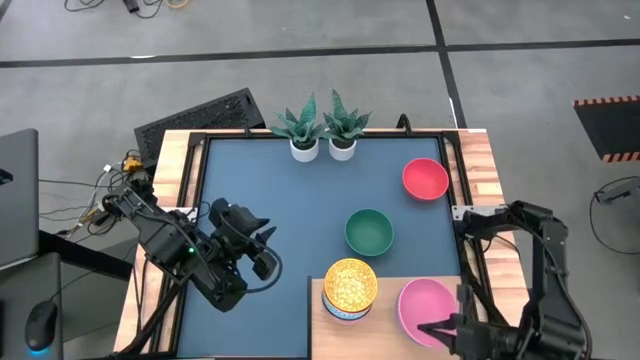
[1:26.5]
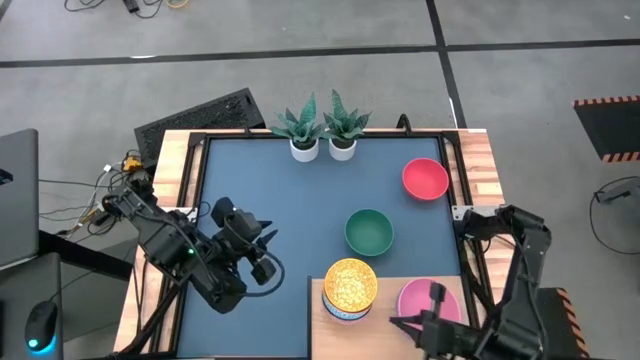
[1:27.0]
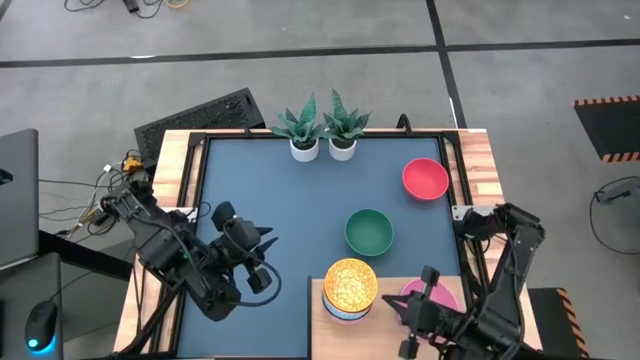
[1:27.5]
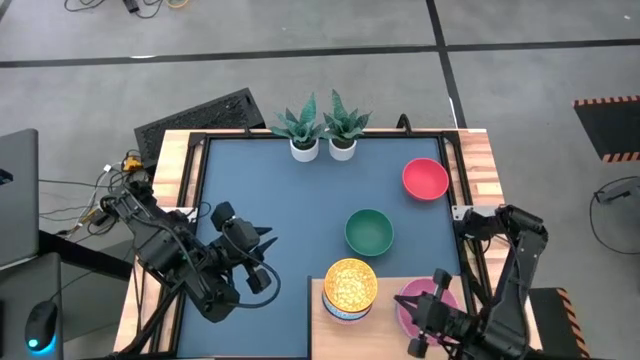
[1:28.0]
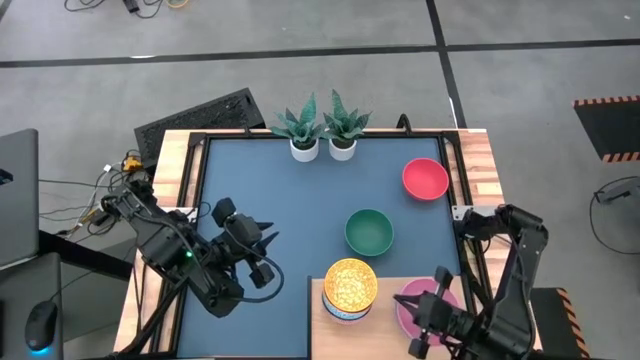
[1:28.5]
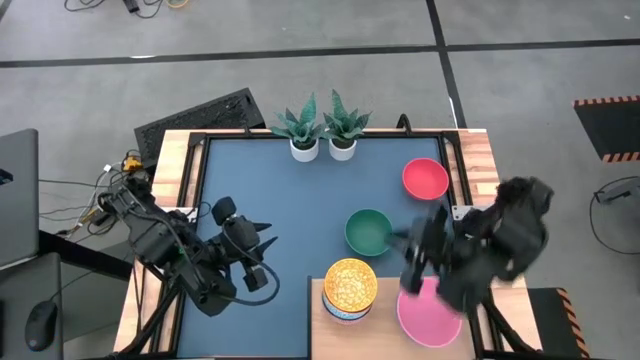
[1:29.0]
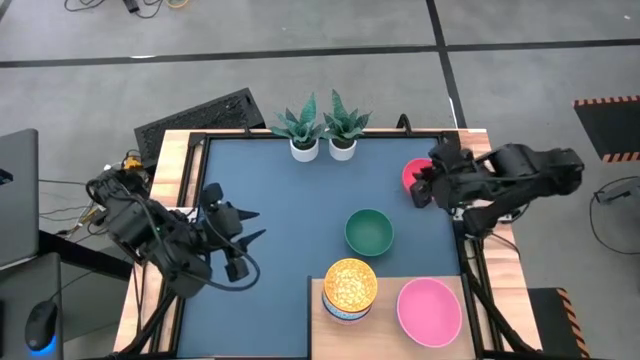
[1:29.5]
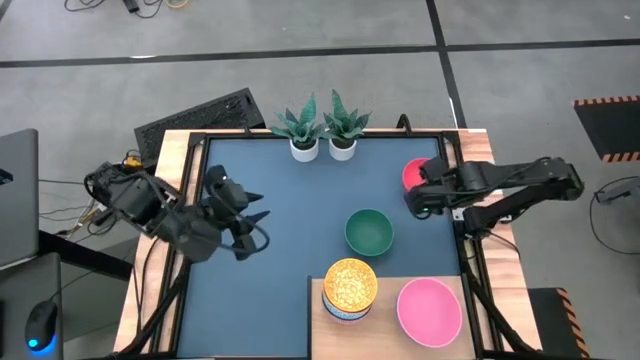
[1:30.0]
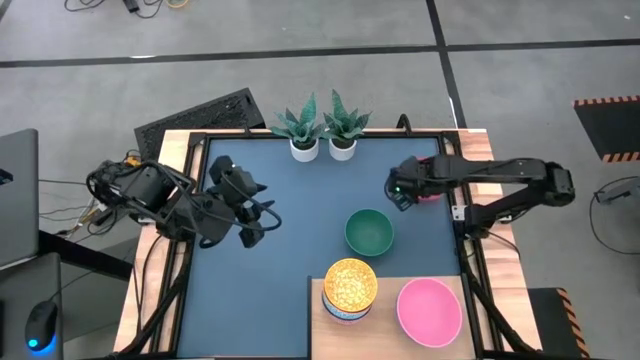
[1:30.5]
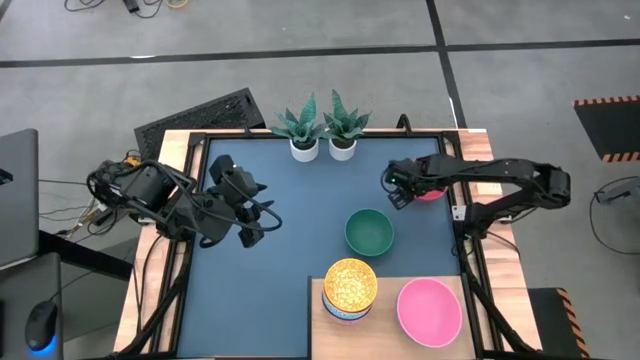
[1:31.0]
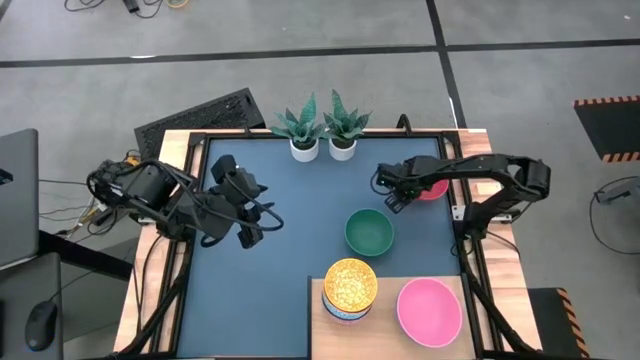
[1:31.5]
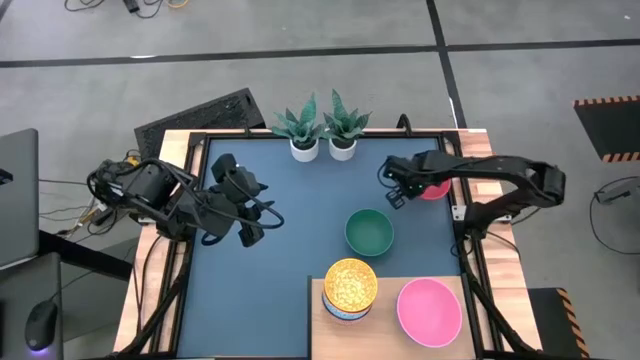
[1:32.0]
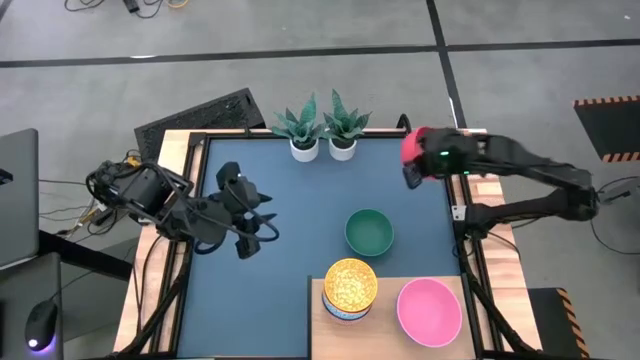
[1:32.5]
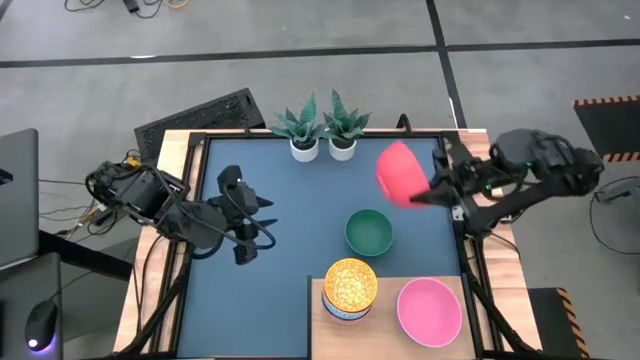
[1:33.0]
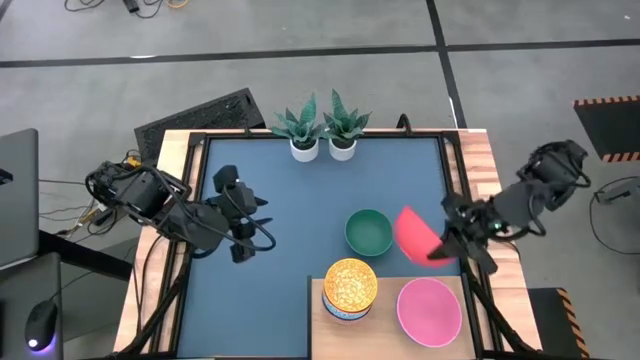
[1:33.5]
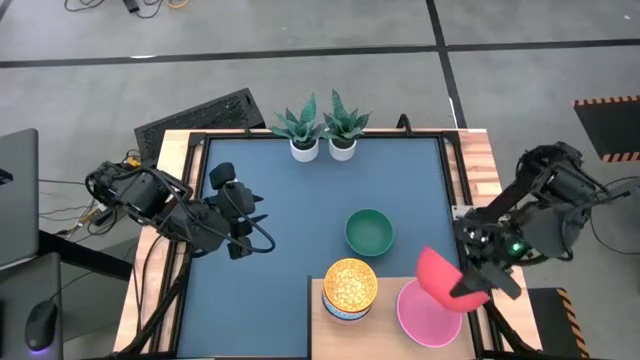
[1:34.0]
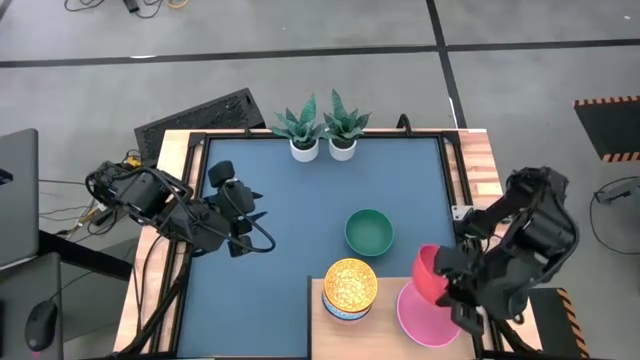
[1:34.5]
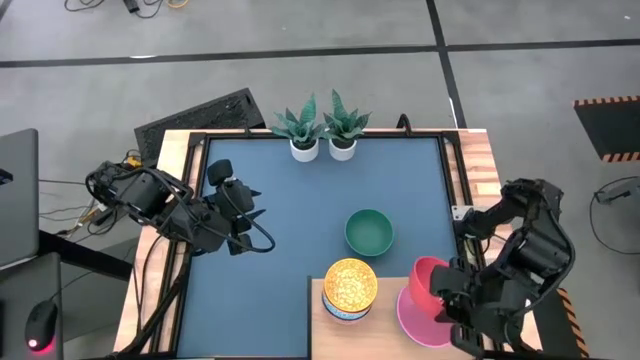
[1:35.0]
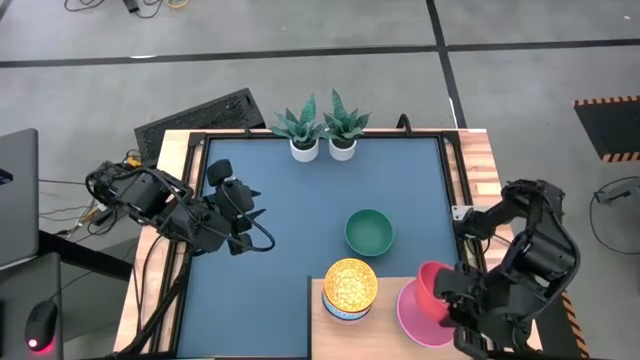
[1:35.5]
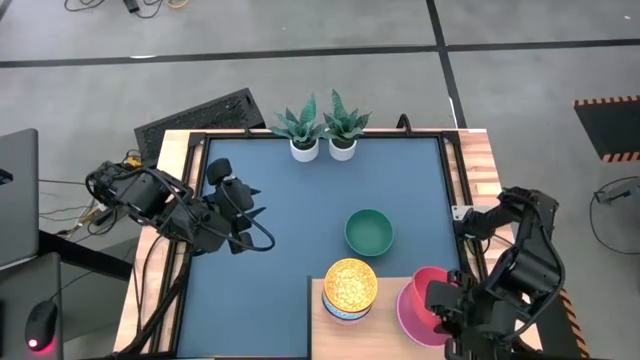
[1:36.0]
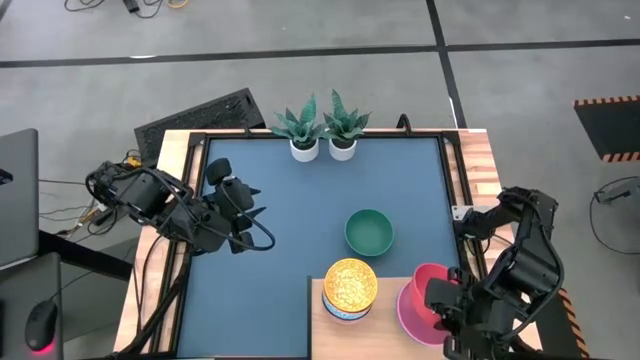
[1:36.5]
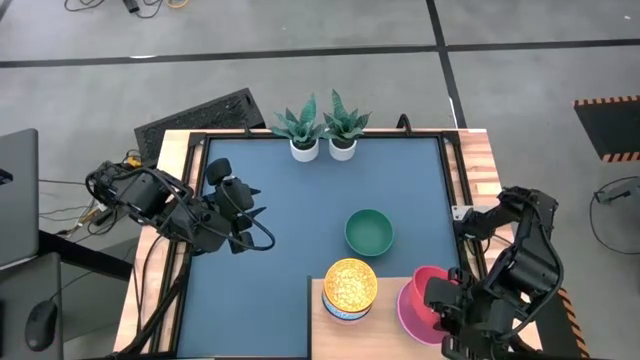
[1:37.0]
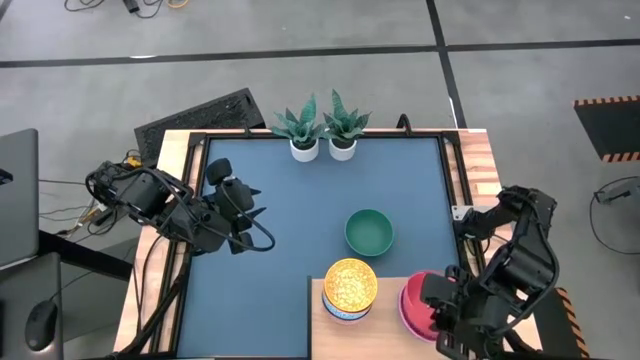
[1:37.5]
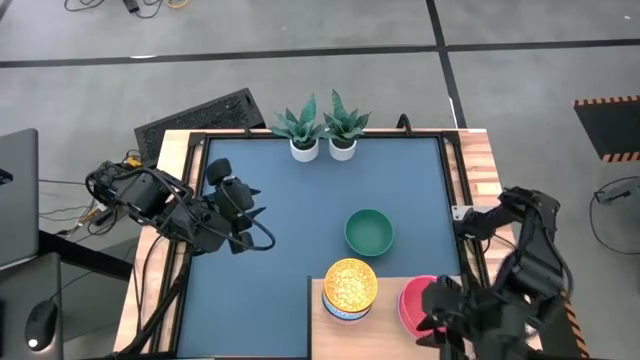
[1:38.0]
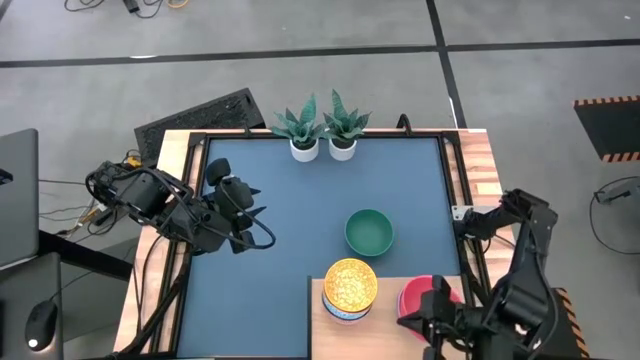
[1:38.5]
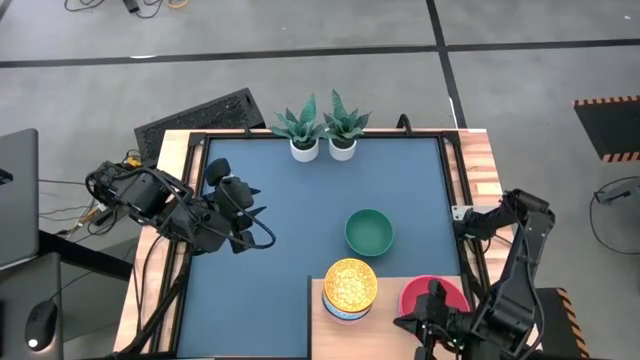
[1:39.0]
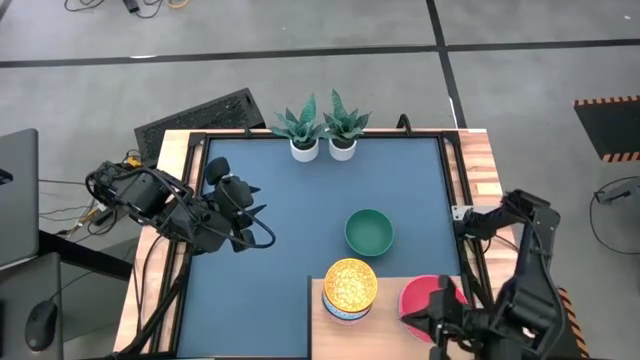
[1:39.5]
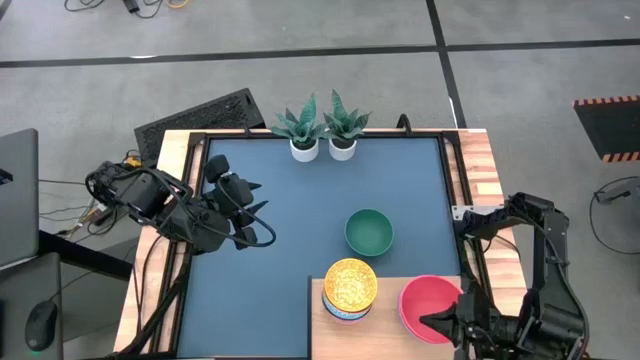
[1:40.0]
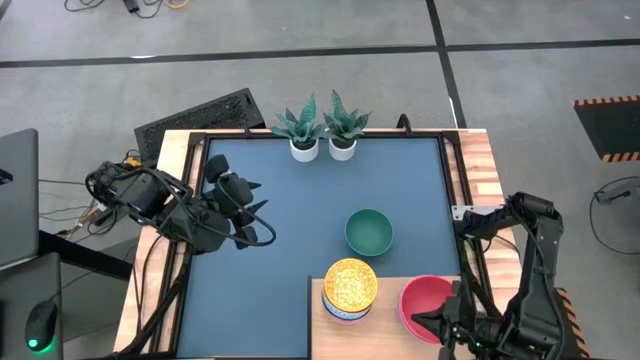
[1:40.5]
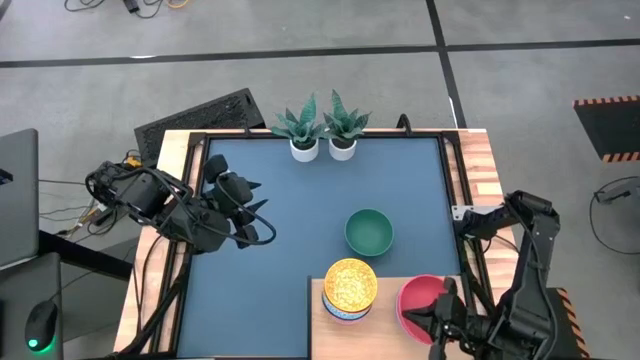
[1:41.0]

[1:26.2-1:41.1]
Task: Place and stack bowls onto a shelf
Stack the orange bowl on top of the pink bowl on the shelf

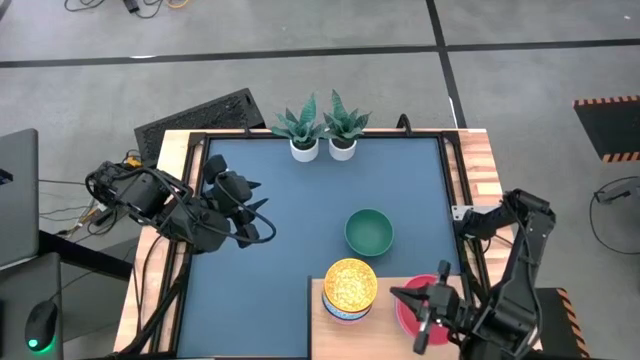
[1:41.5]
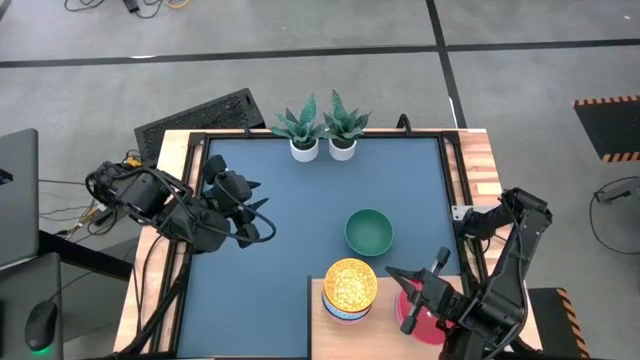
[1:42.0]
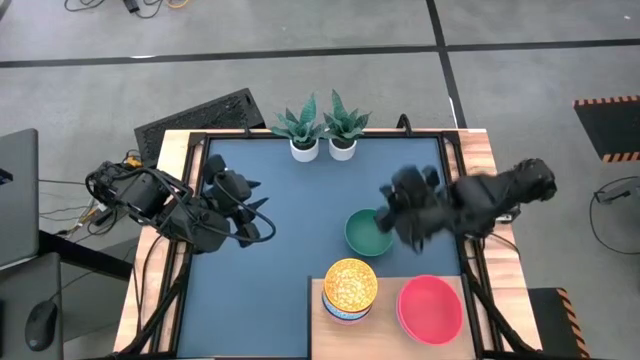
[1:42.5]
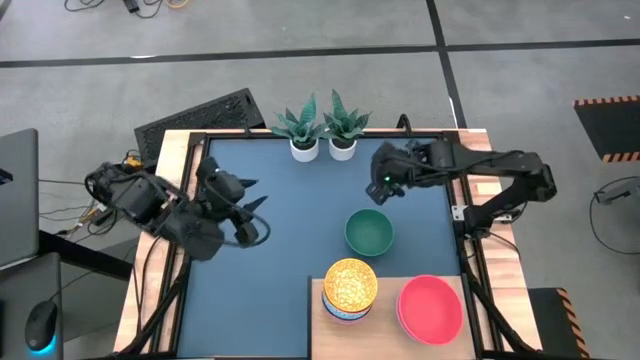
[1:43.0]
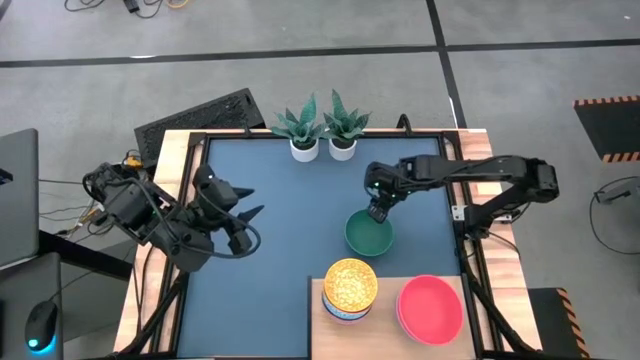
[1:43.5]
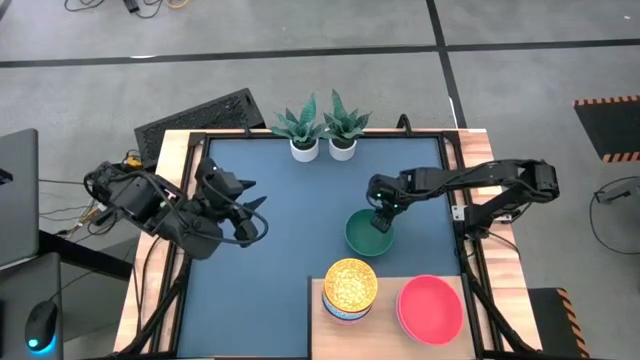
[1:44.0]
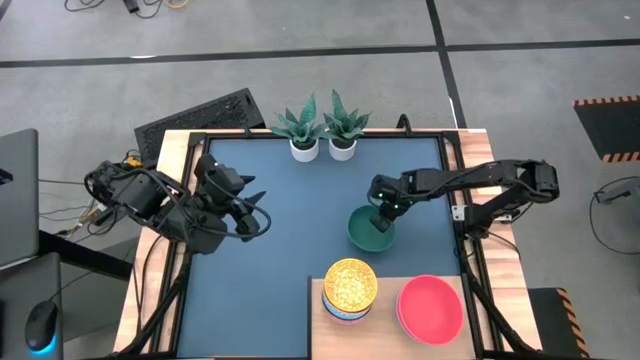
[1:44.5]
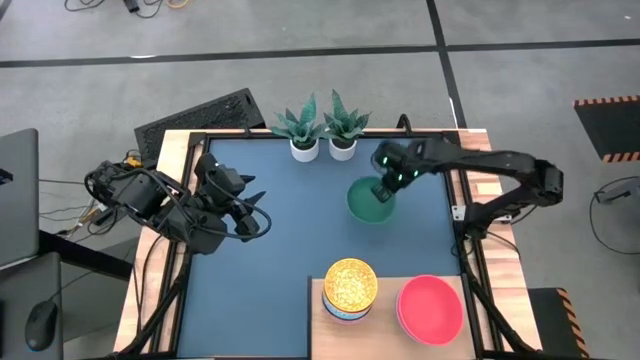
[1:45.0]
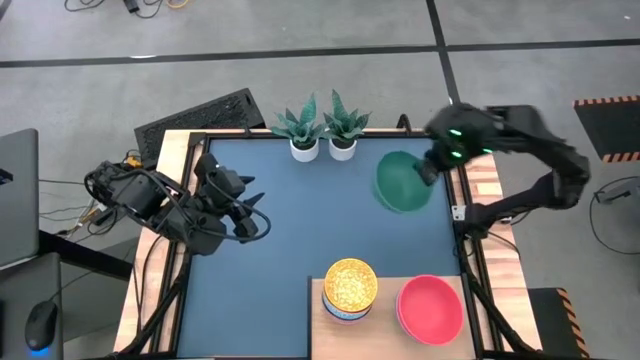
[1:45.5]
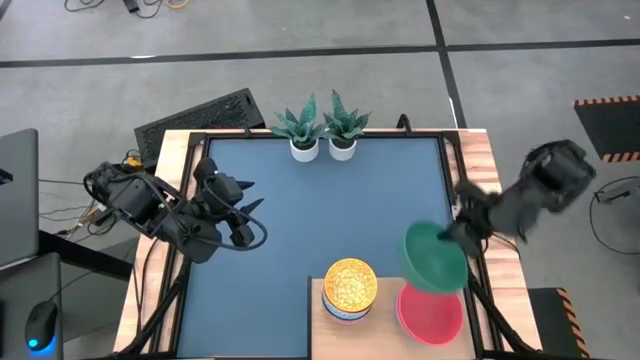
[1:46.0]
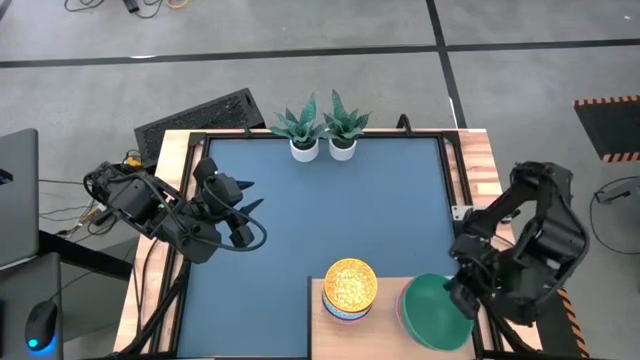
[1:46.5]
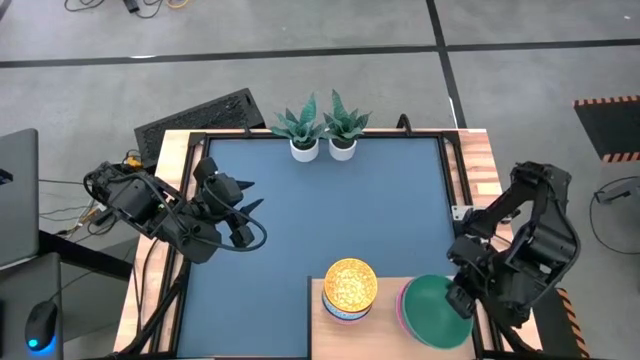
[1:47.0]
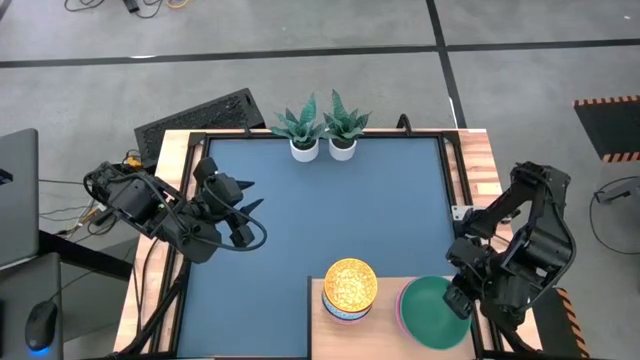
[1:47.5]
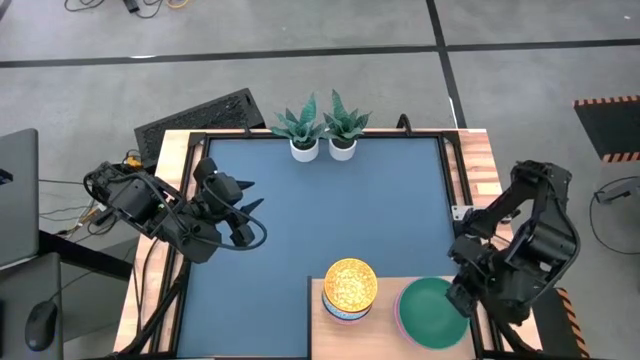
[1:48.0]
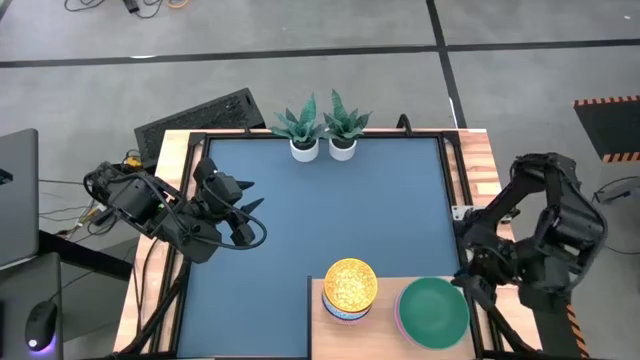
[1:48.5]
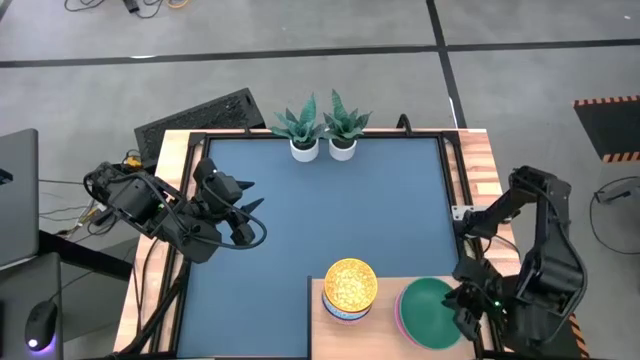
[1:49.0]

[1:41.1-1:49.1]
Stack the green bowl on top of the dark pink bowl on the shelf
